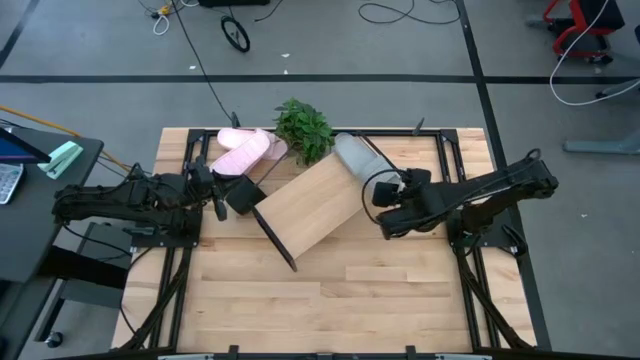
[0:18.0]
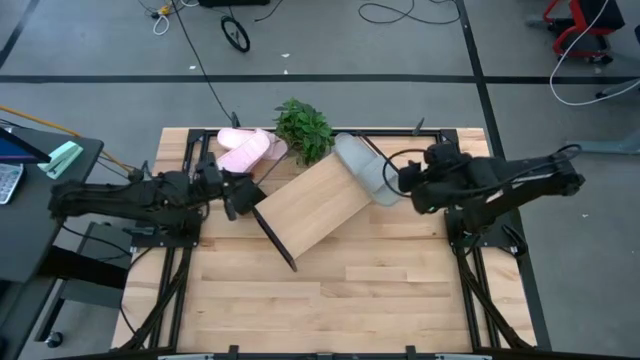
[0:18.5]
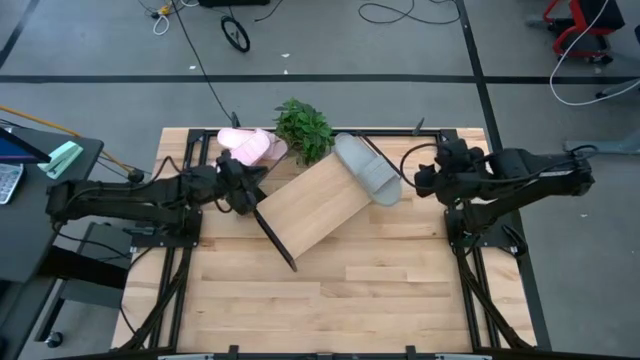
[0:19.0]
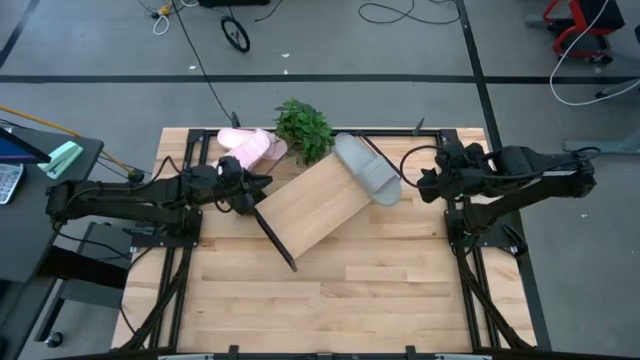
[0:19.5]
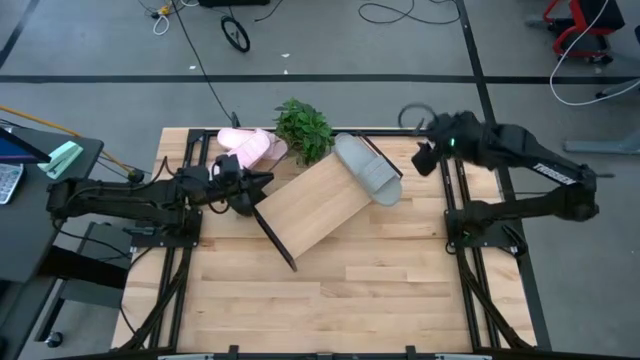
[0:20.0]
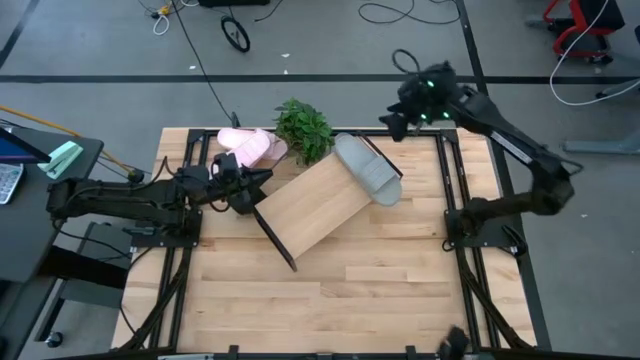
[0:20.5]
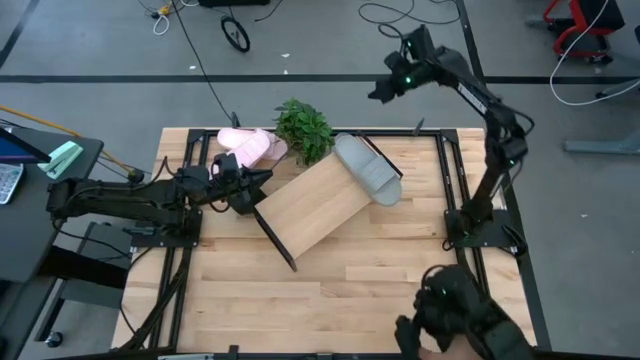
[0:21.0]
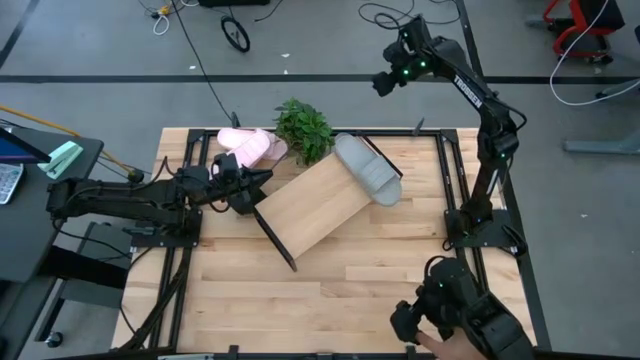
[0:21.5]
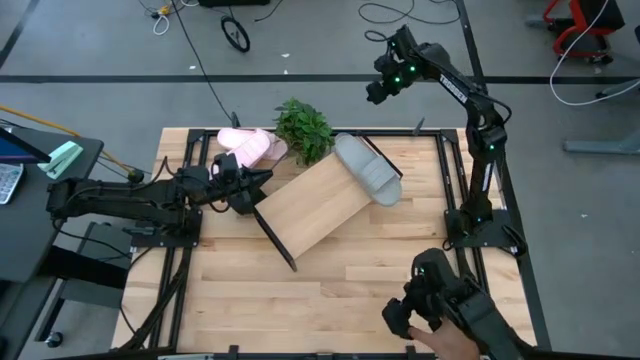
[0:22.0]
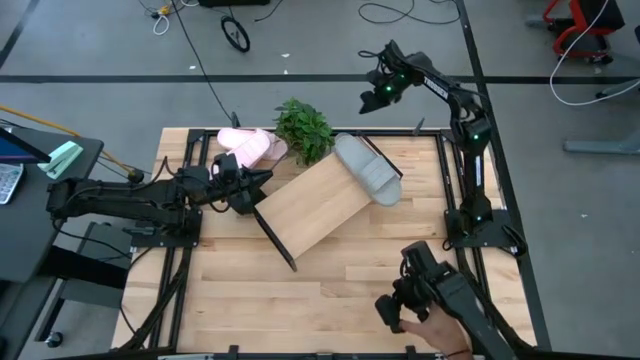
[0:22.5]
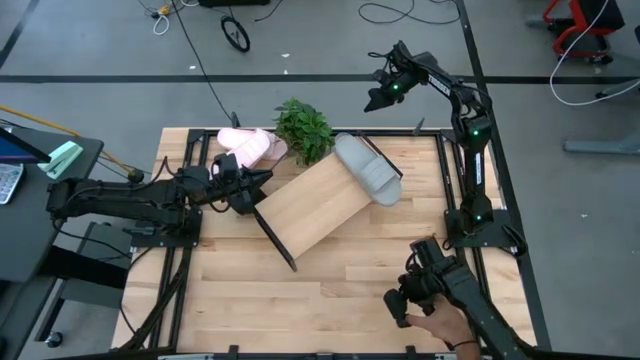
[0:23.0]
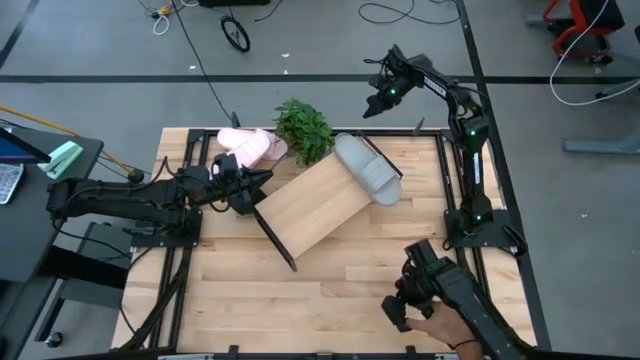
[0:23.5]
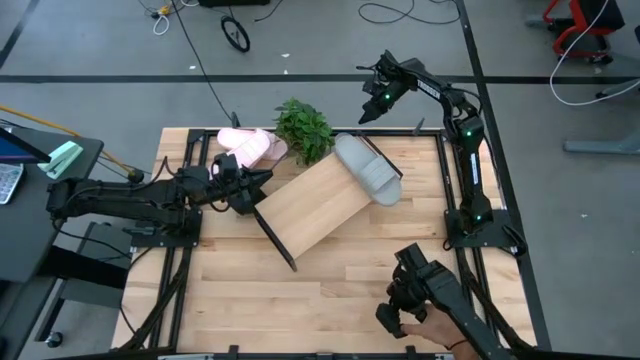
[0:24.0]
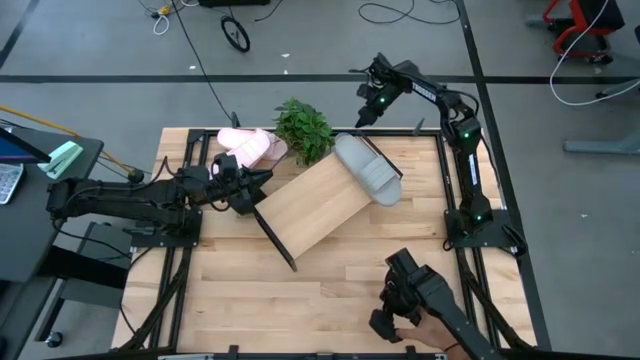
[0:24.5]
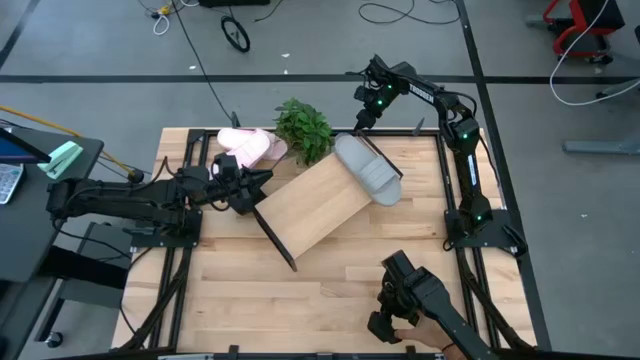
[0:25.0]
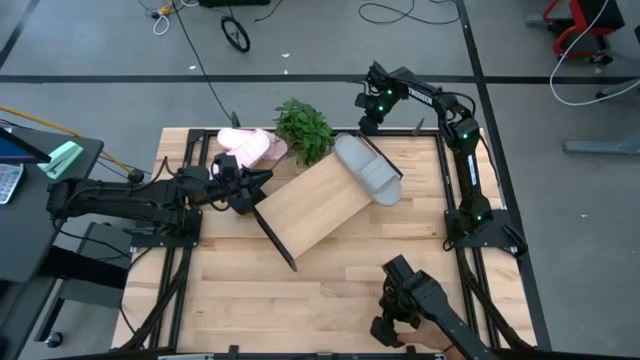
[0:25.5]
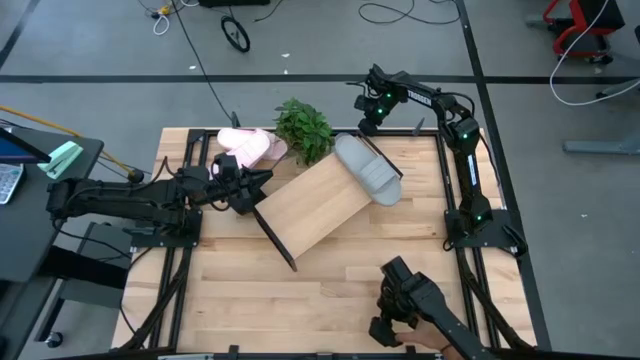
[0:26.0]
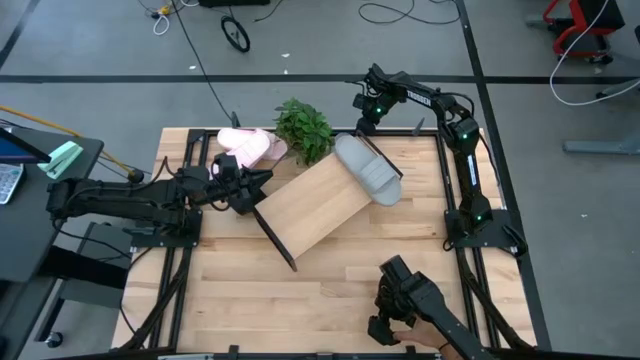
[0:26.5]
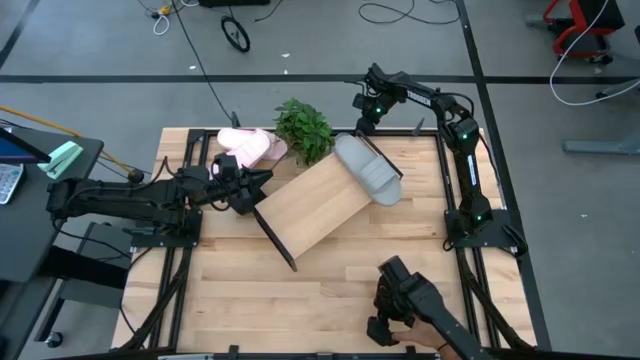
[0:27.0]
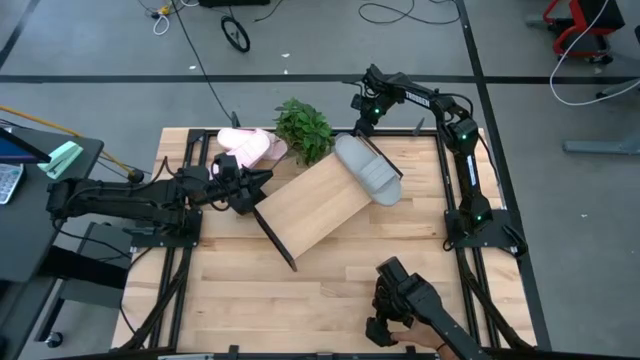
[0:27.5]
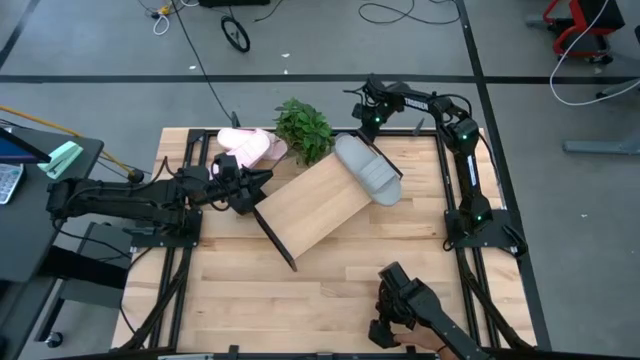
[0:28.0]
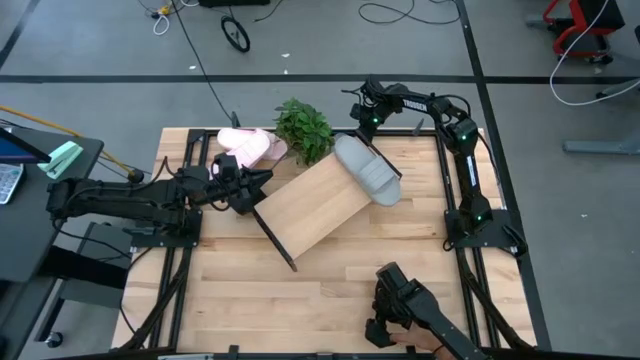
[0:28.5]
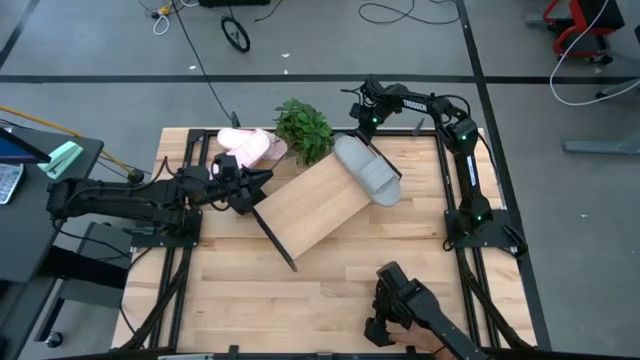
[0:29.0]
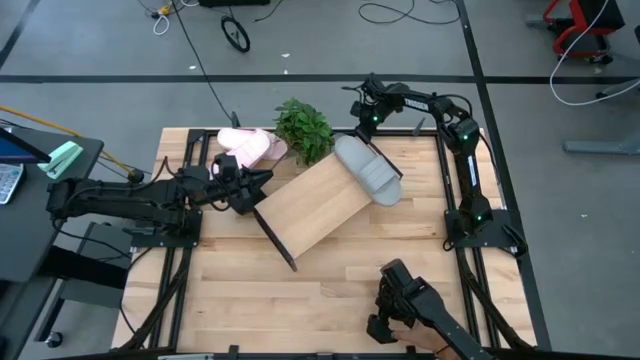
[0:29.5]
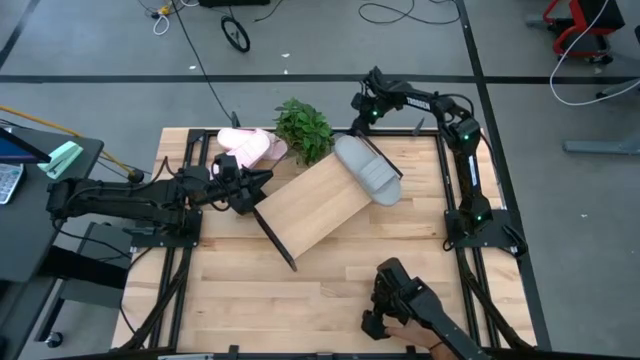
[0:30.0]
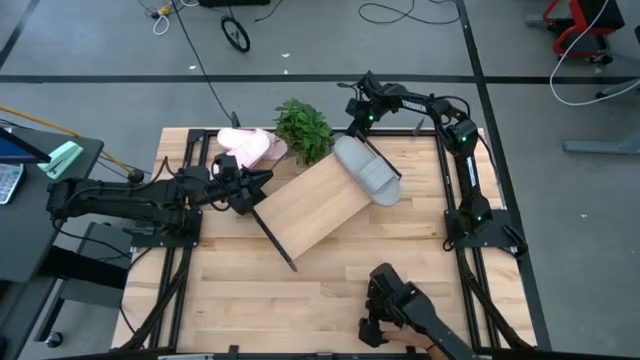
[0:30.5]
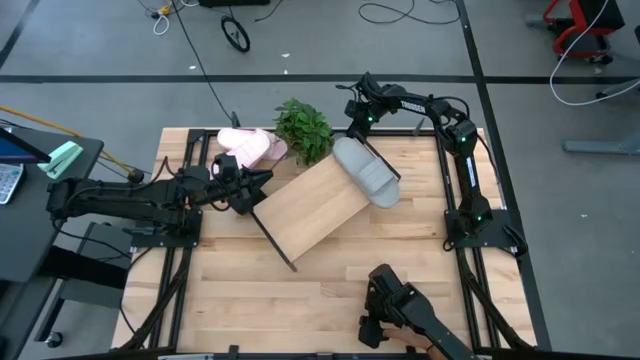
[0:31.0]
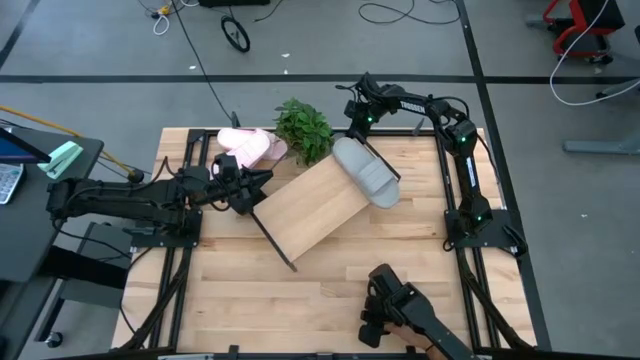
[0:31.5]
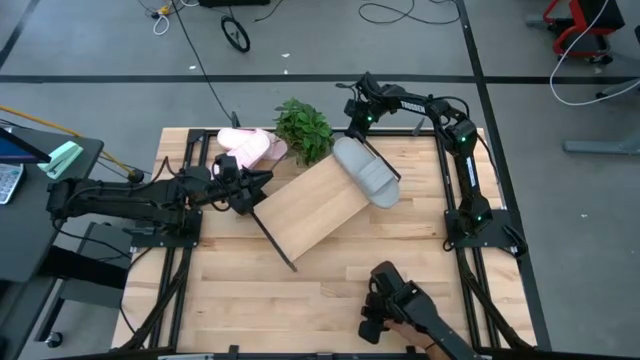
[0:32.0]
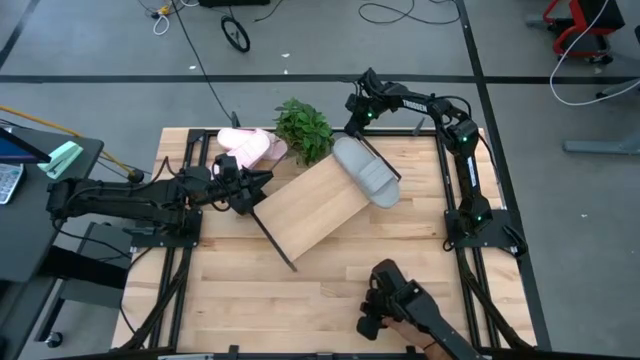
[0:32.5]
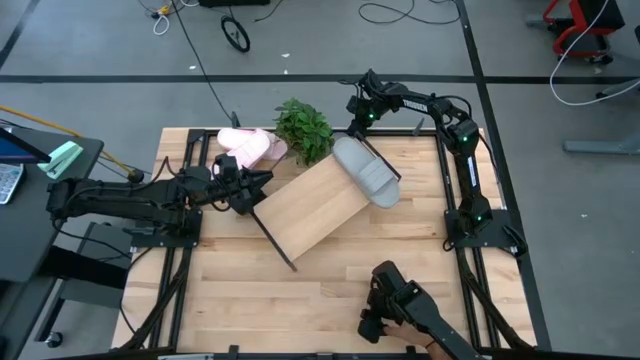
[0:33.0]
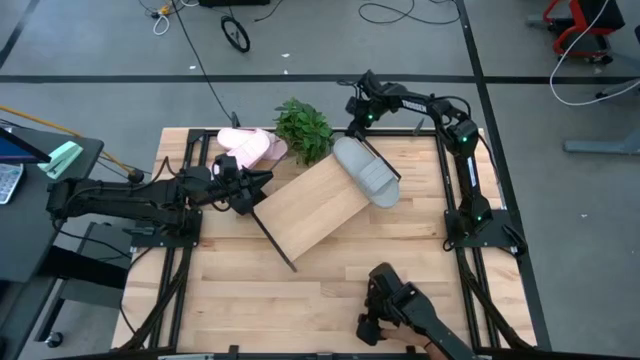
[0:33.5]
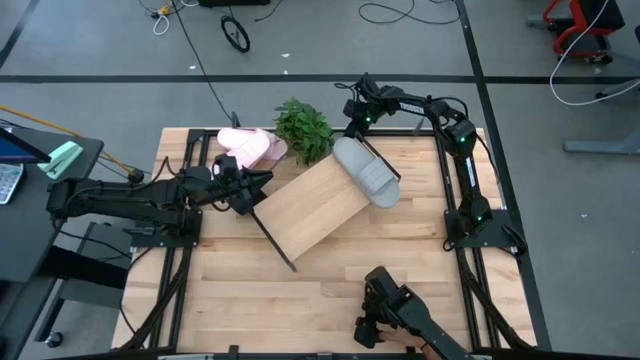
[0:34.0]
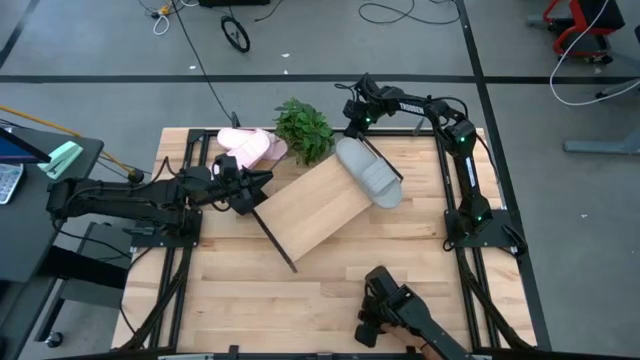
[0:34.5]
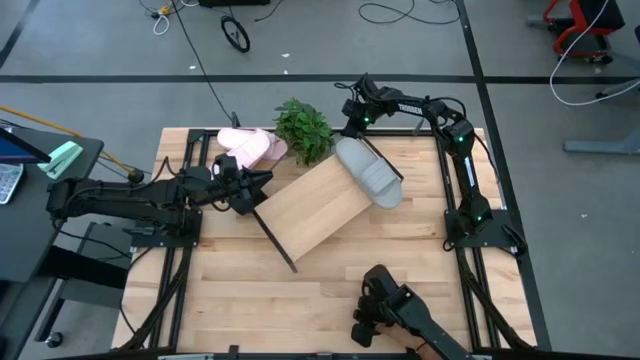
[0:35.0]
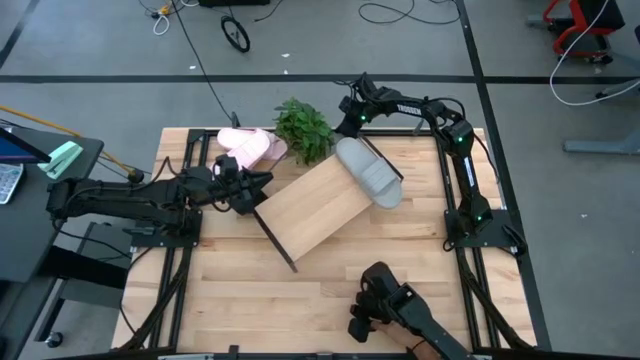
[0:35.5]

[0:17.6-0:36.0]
Task: Pick and place slides into the shelf
Put the gray slides on the shelf

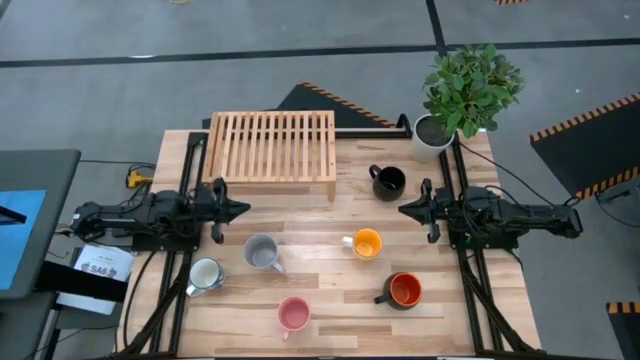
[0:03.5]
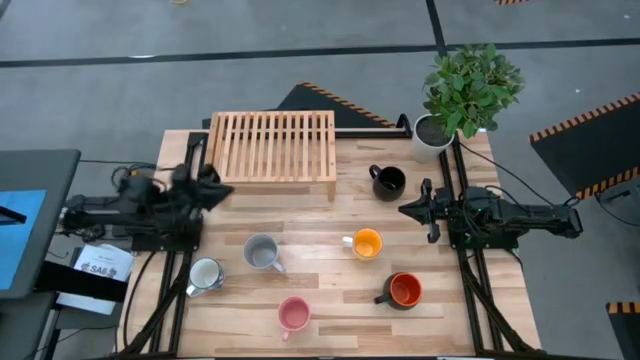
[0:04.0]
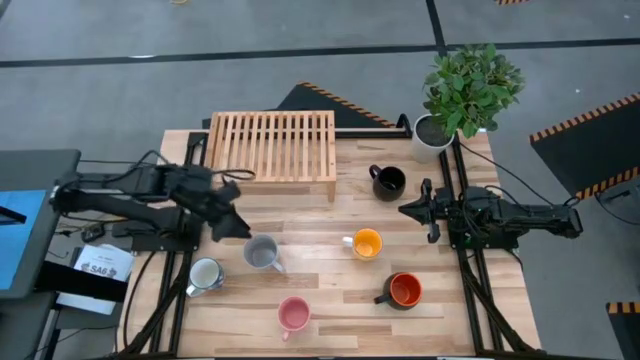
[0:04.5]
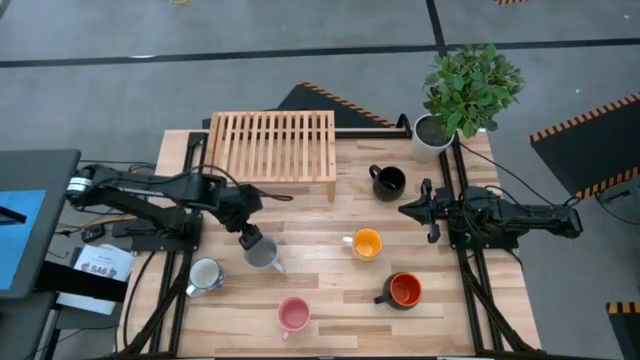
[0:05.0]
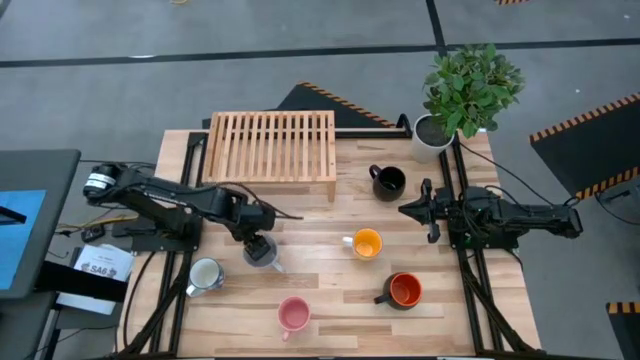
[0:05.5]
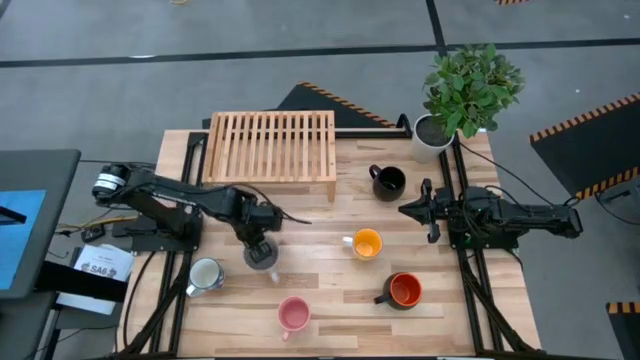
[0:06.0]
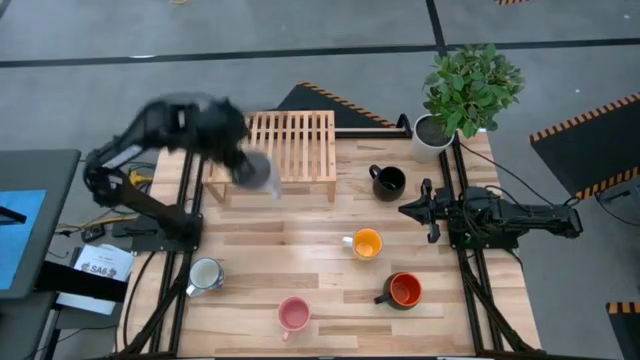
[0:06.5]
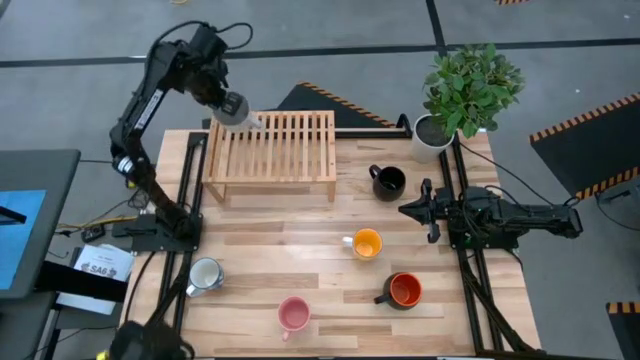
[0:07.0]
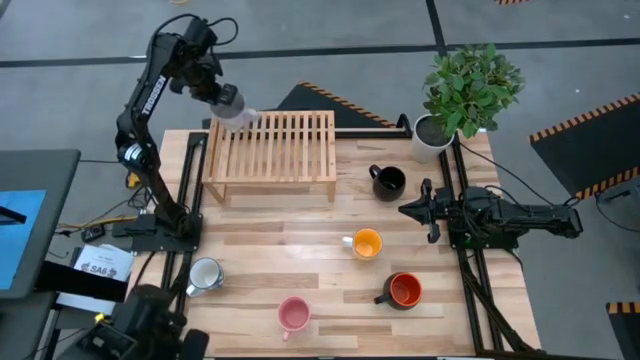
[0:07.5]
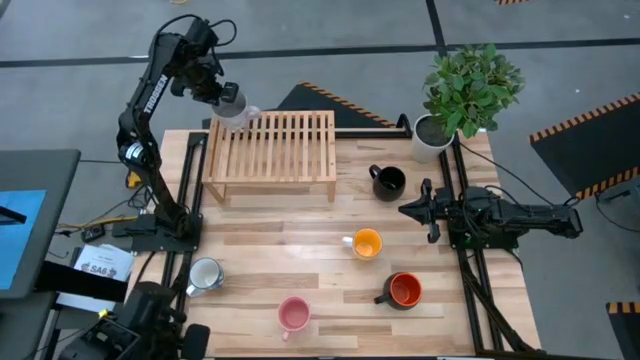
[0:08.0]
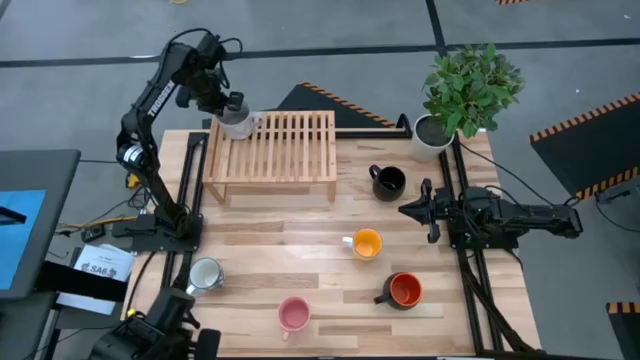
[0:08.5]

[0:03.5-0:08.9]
Task: Place coffee mugs
Put the gray mug on the shelf
